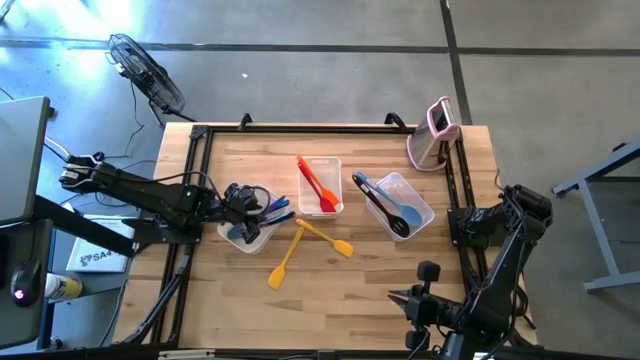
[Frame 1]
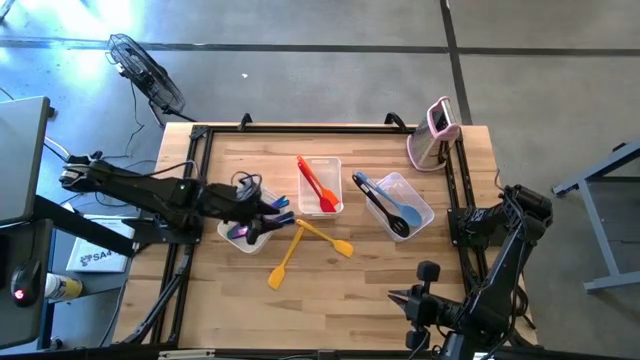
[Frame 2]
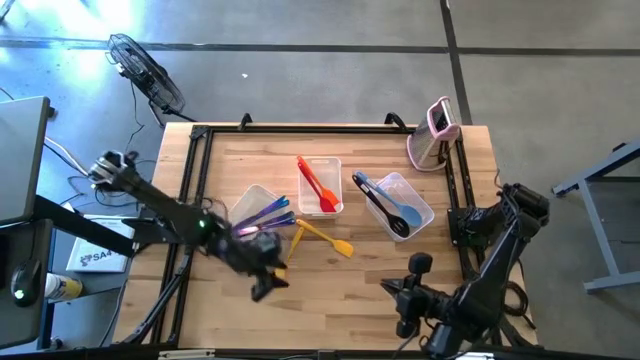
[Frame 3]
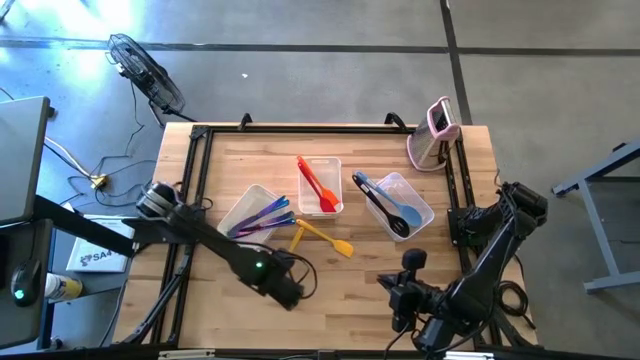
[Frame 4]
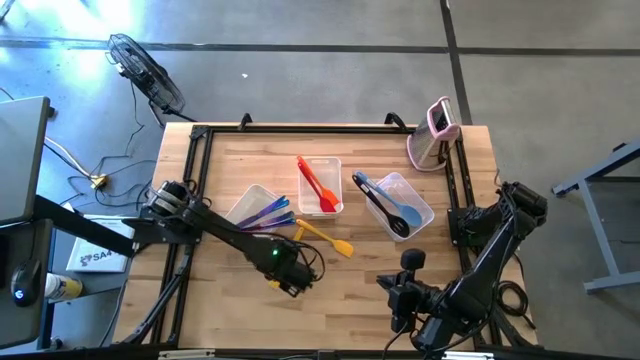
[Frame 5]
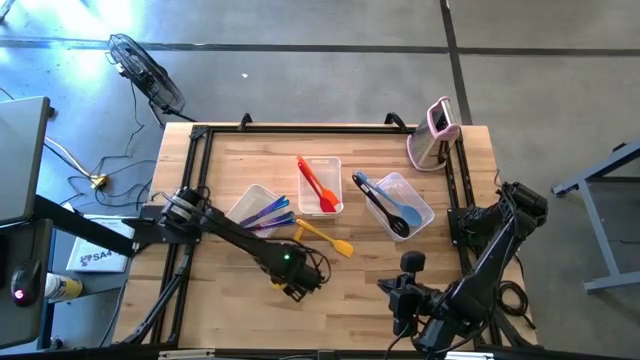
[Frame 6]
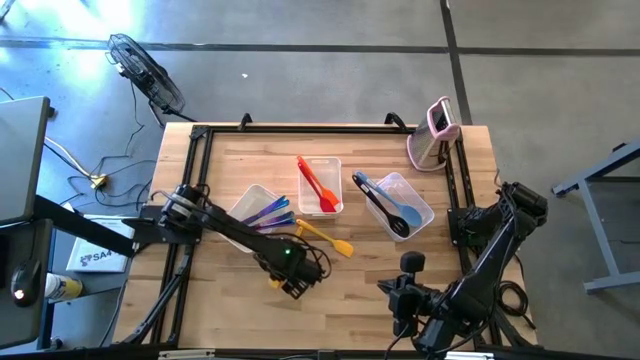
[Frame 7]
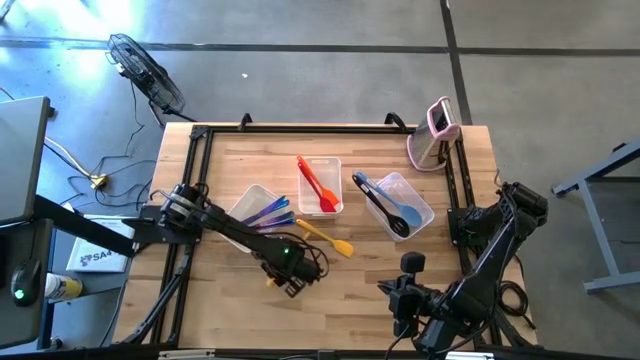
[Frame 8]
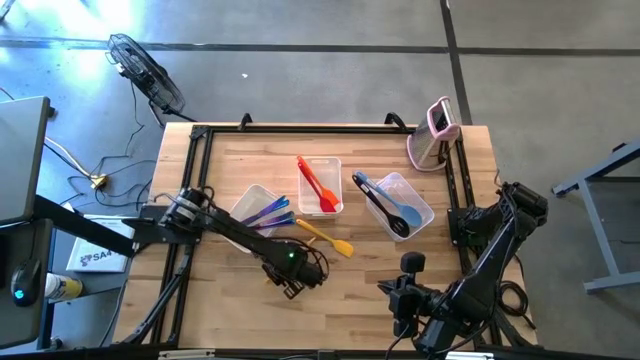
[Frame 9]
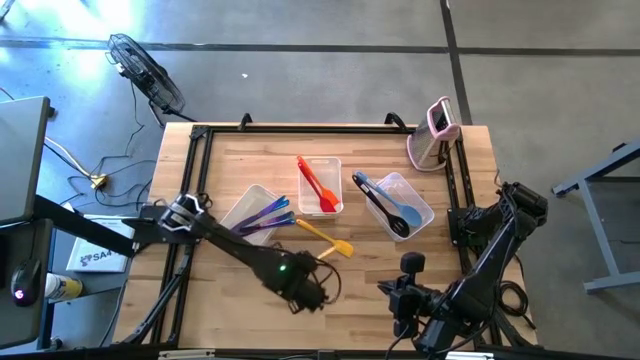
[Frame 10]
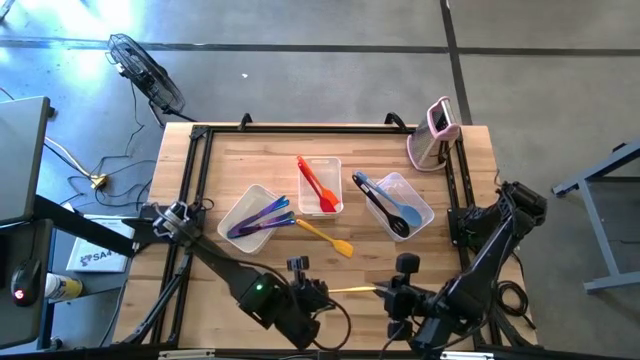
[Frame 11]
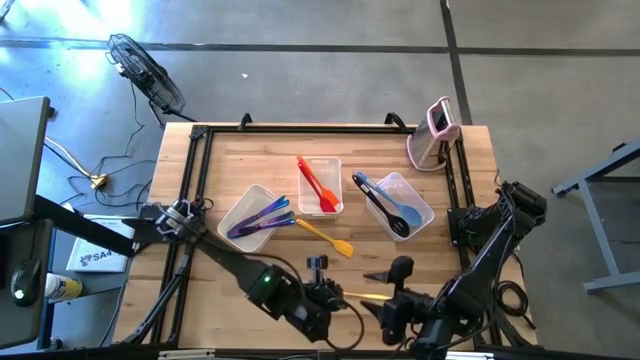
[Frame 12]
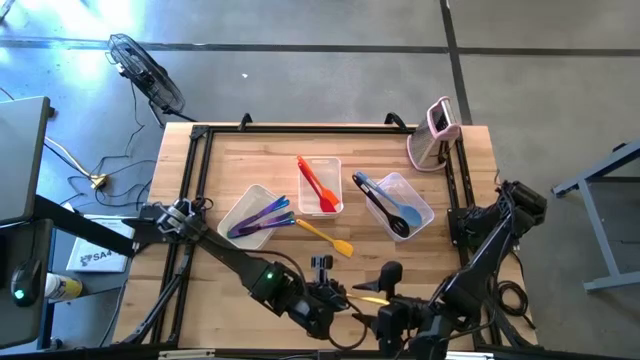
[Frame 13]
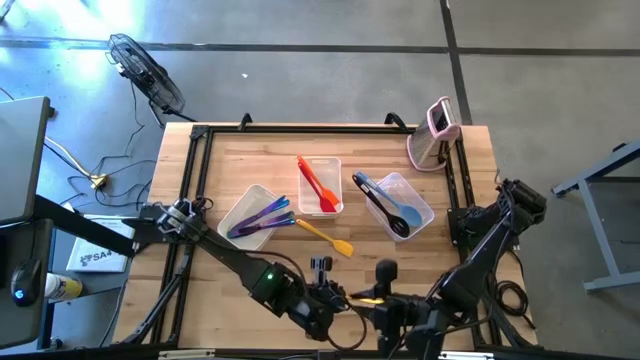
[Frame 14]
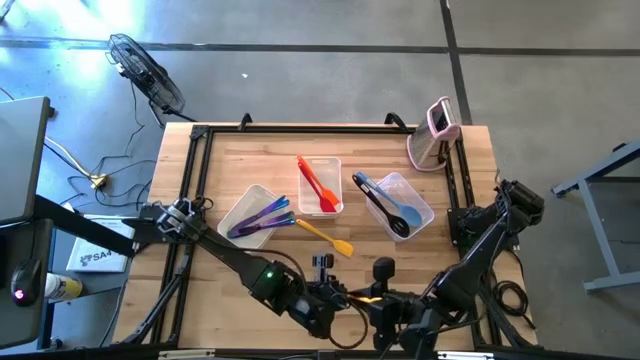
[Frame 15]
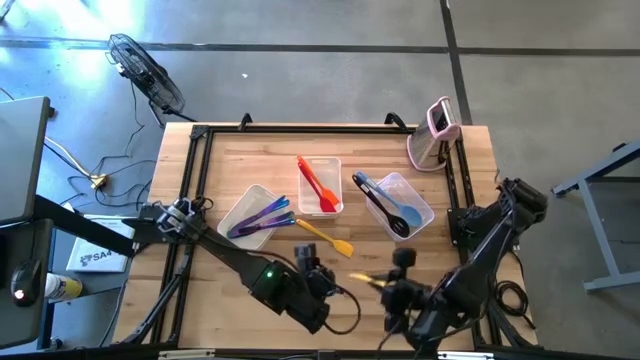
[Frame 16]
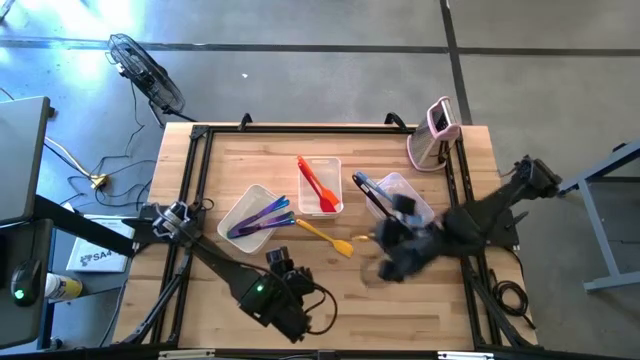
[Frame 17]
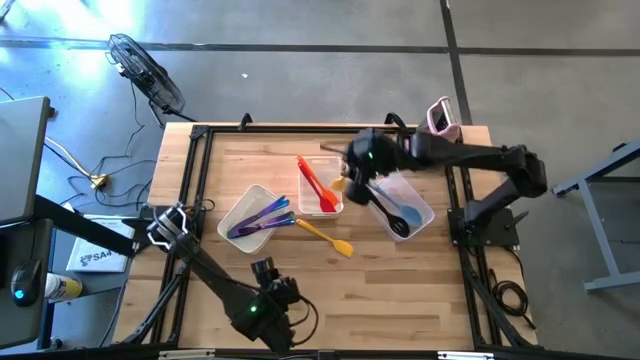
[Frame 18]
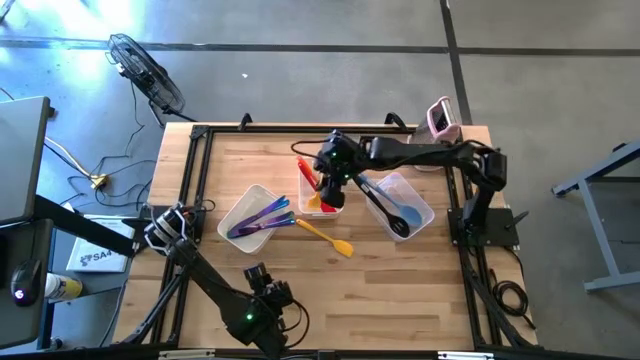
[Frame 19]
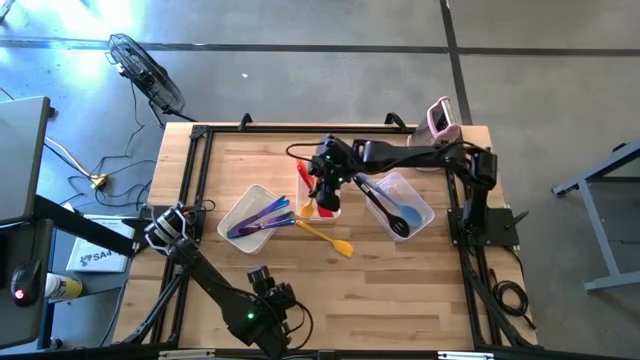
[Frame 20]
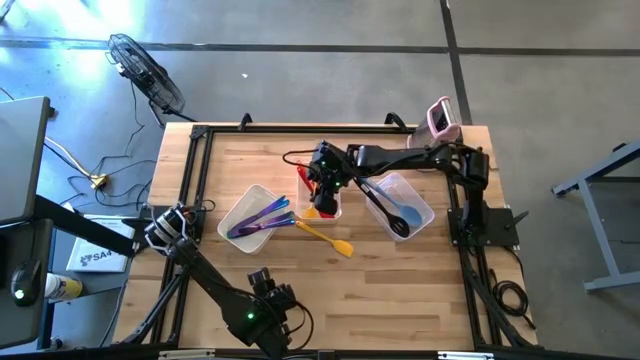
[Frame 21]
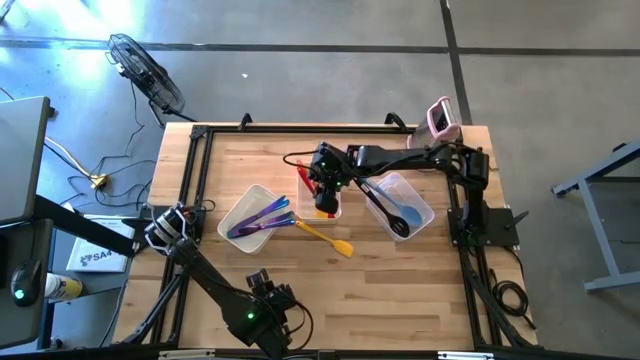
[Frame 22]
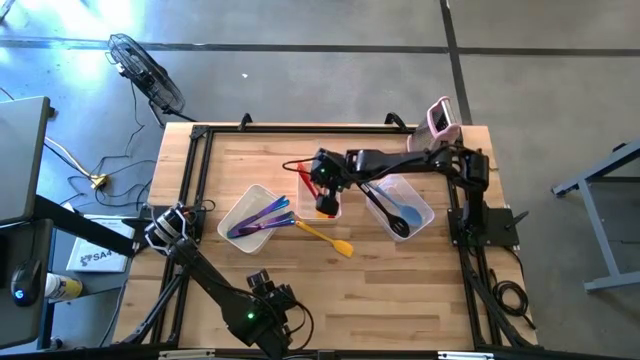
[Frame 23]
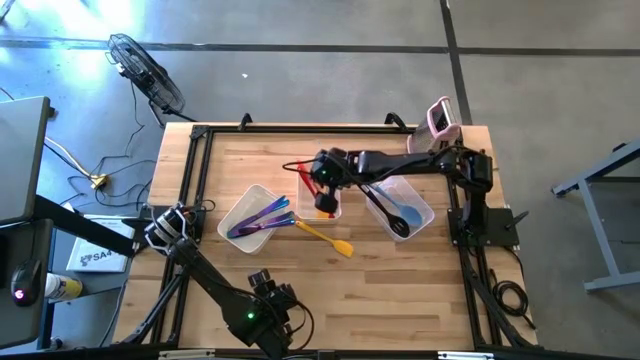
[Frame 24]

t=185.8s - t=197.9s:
Task: Pick & Place Kitchen Items
Put the yellow spatula into the right white bin

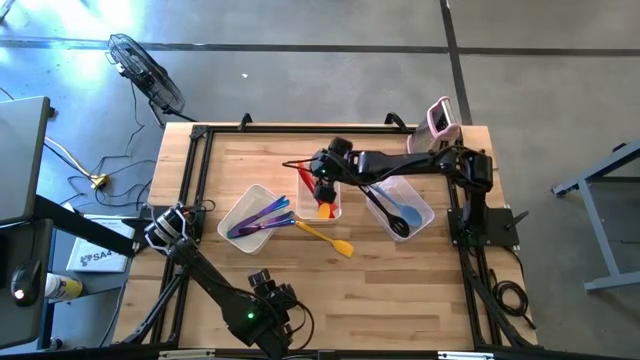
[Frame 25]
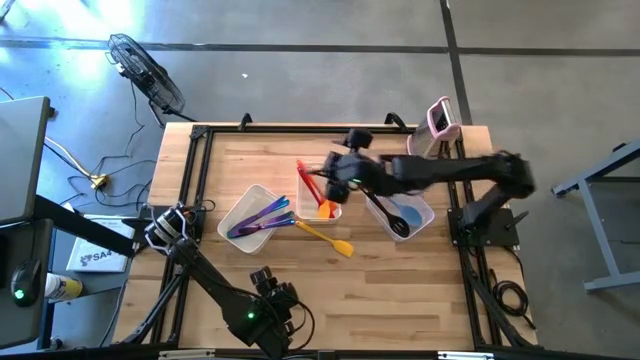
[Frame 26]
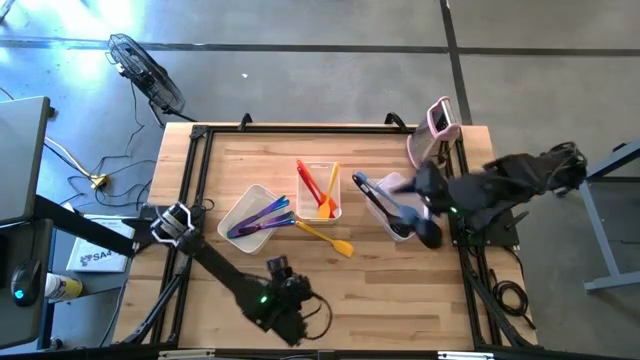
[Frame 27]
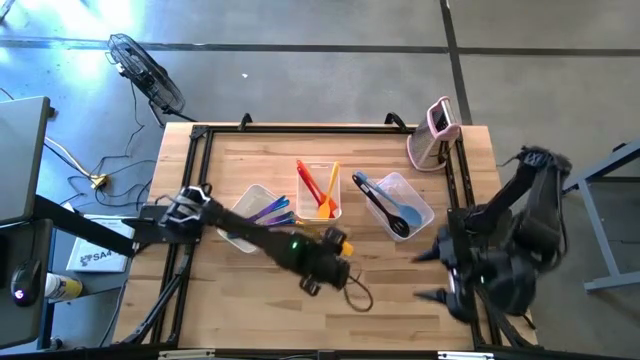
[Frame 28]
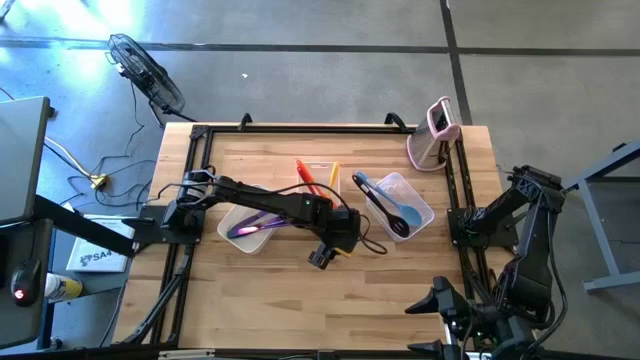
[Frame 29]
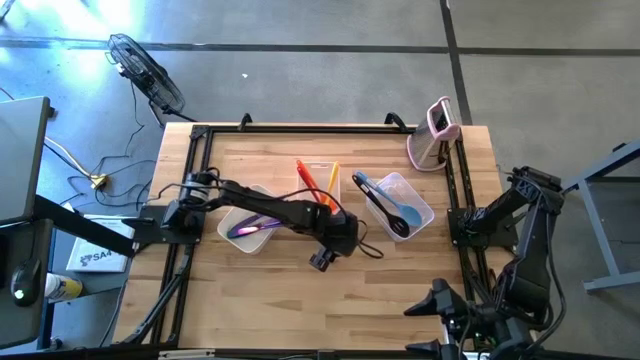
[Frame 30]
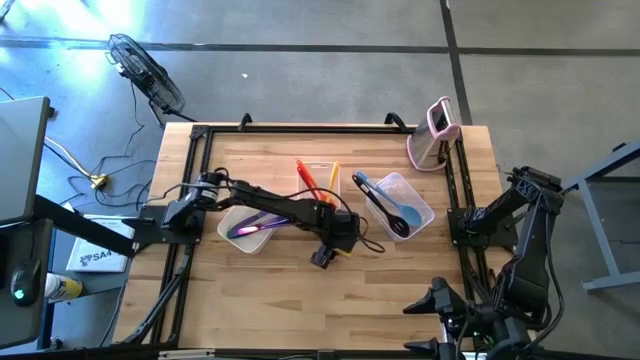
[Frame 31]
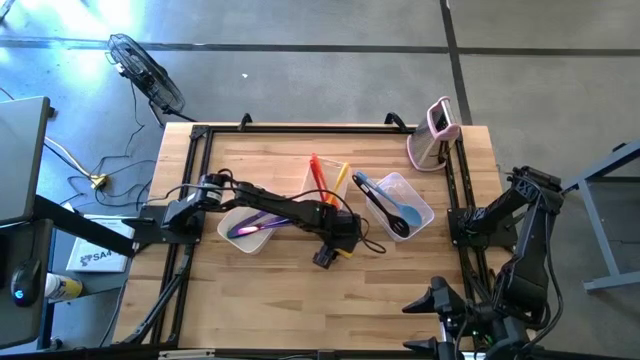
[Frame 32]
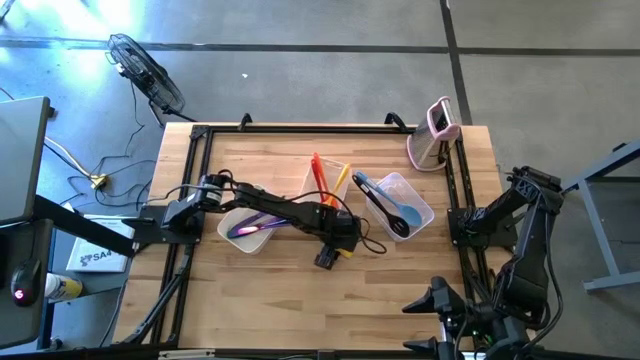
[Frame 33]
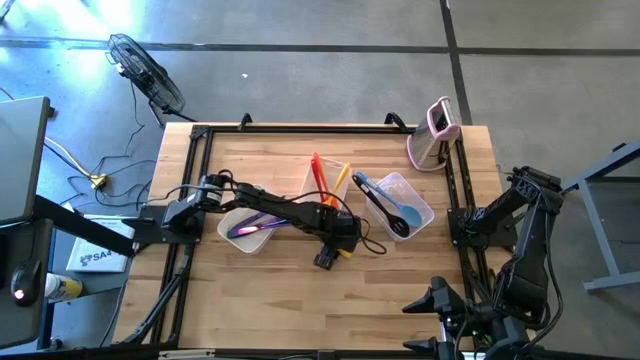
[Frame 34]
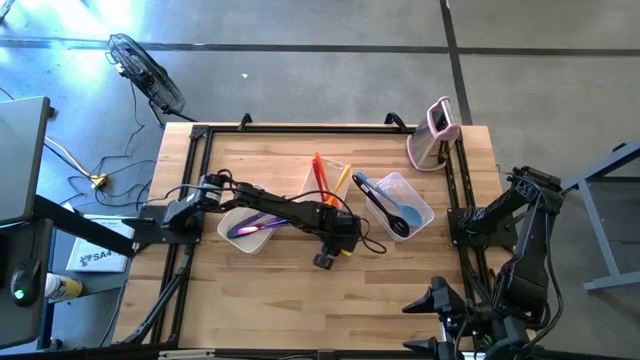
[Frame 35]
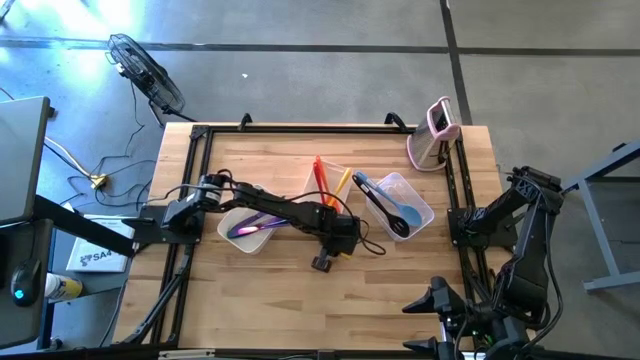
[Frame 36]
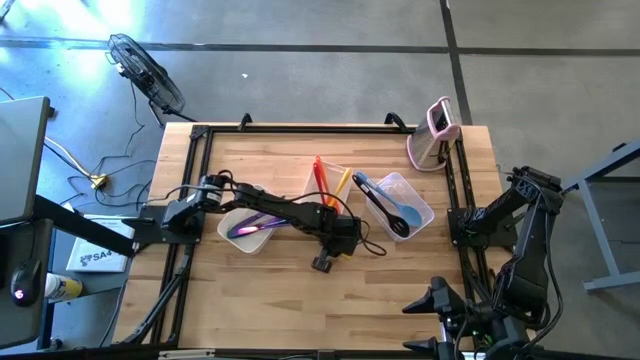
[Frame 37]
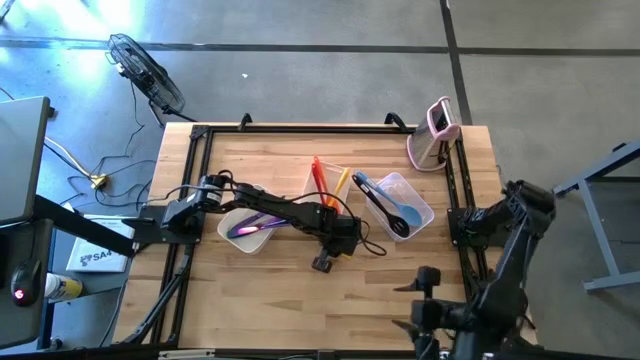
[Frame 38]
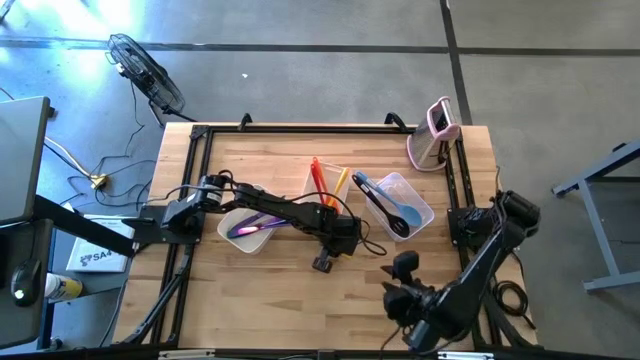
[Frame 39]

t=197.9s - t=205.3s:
Put the yellow spatula into the right white bin

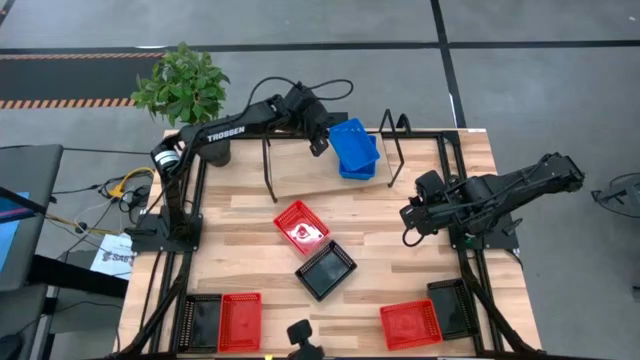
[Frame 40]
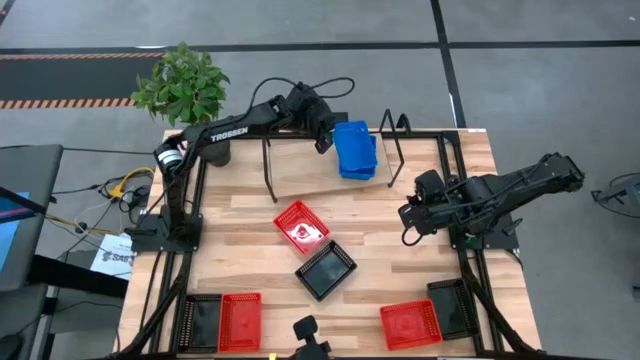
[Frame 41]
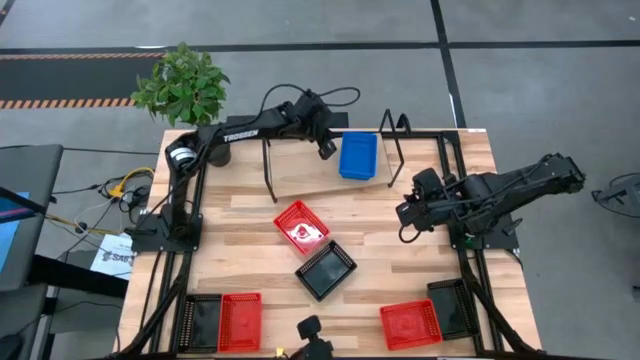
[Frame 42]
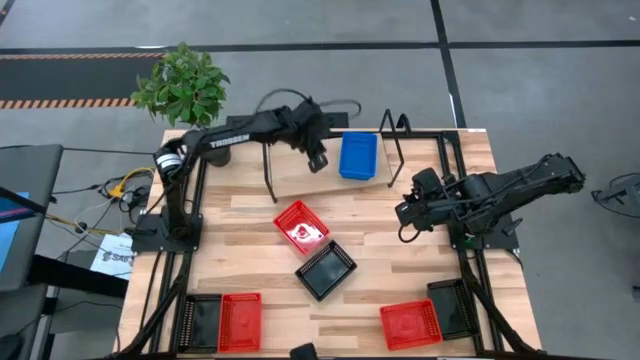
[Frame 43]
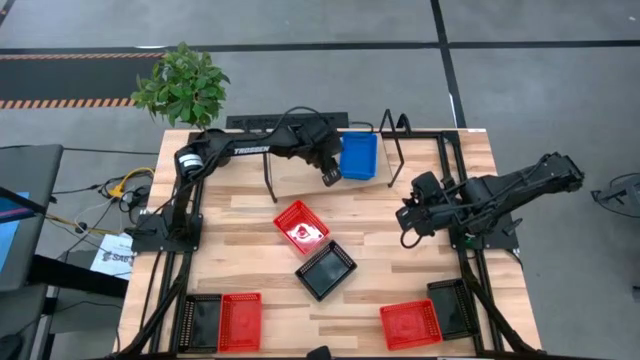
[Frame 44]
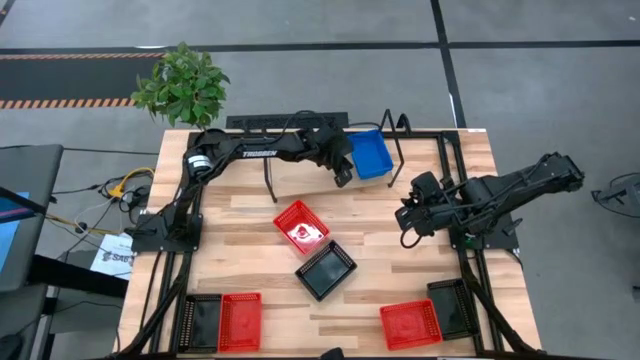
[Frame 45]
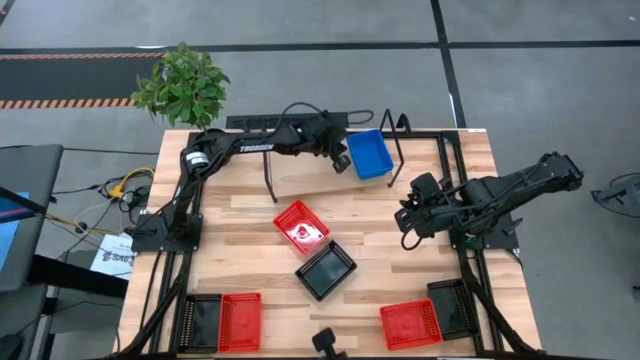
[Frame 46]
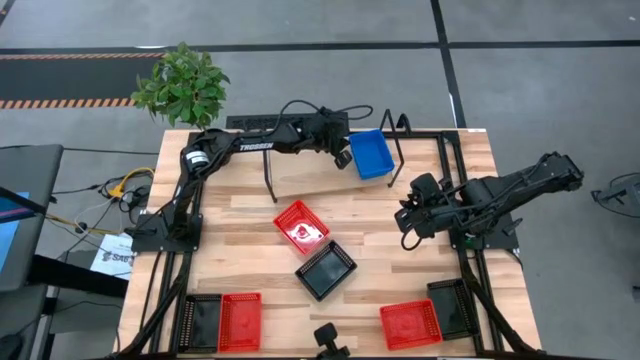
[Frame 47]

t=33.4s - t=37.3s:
Task: Stack baskets on shelf by color
Stack the blue bin on top of the blue bin on the shelf
